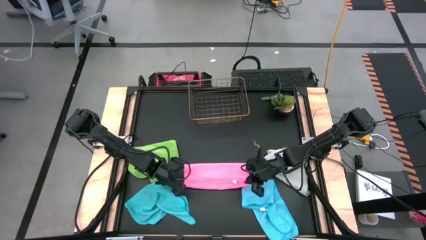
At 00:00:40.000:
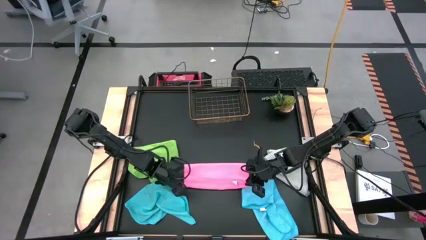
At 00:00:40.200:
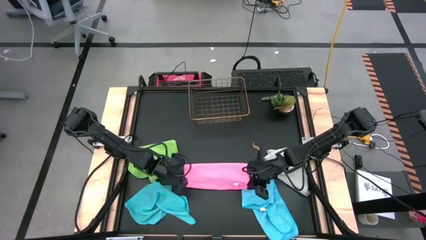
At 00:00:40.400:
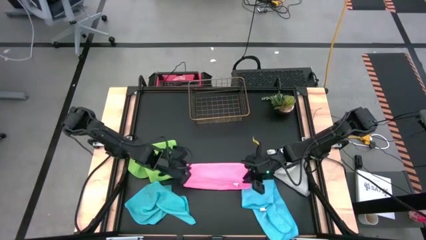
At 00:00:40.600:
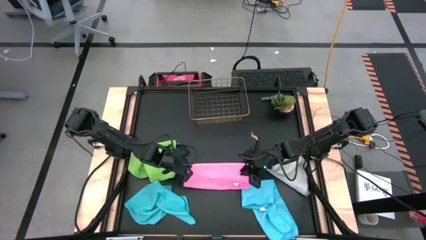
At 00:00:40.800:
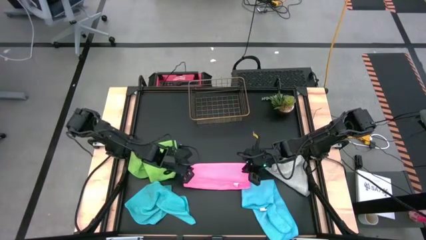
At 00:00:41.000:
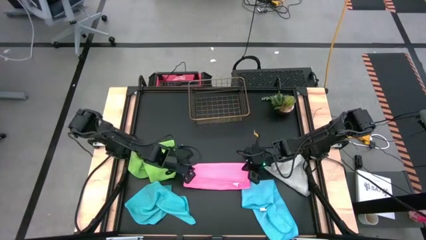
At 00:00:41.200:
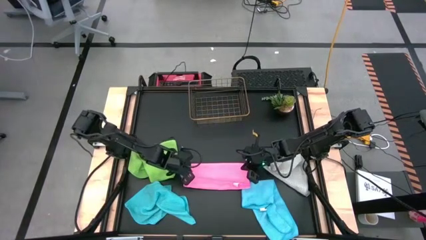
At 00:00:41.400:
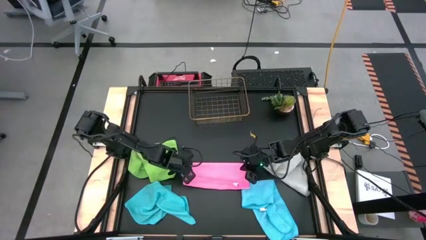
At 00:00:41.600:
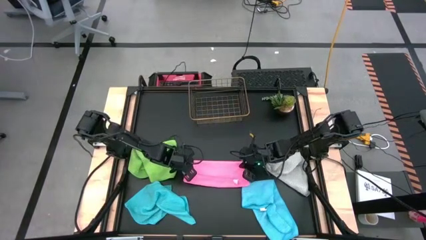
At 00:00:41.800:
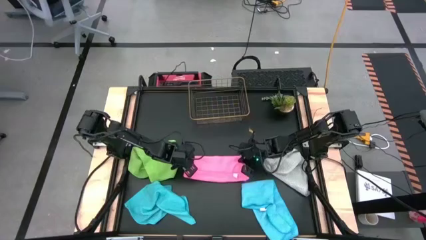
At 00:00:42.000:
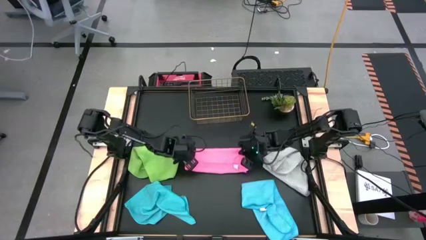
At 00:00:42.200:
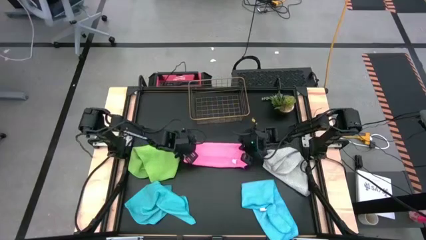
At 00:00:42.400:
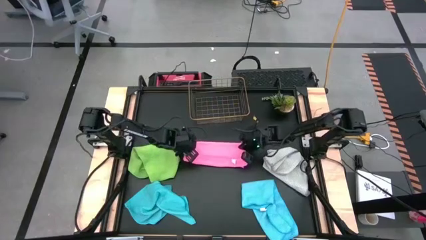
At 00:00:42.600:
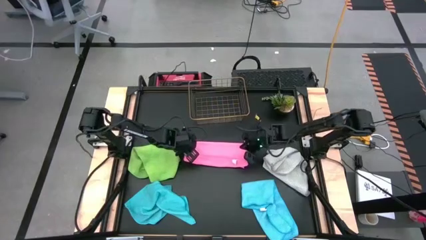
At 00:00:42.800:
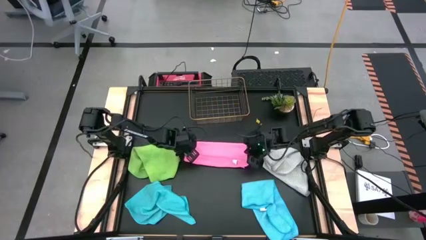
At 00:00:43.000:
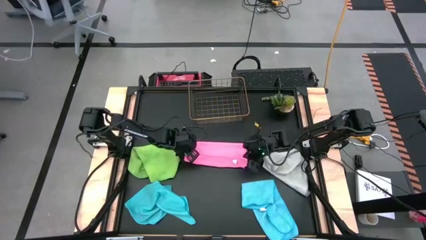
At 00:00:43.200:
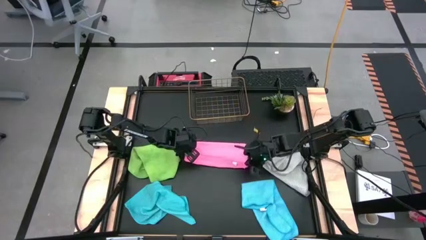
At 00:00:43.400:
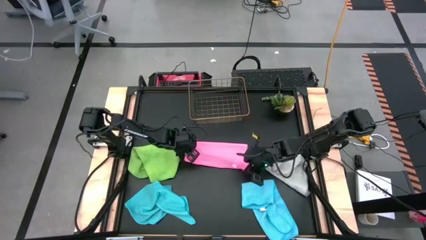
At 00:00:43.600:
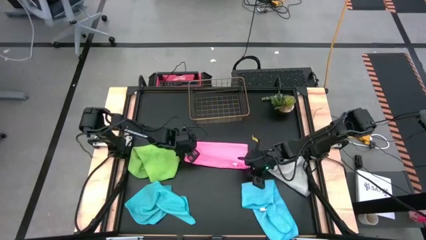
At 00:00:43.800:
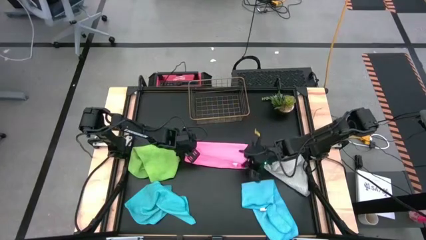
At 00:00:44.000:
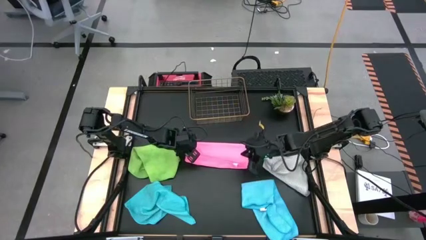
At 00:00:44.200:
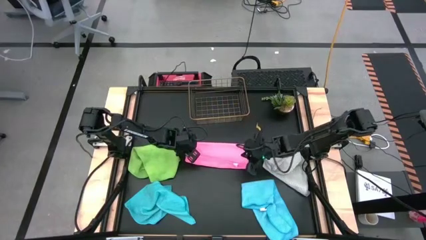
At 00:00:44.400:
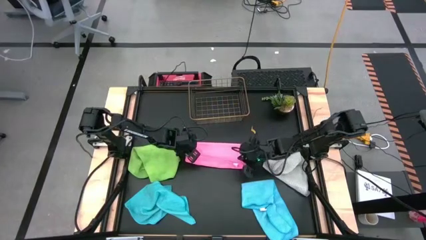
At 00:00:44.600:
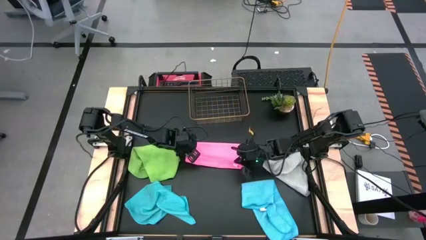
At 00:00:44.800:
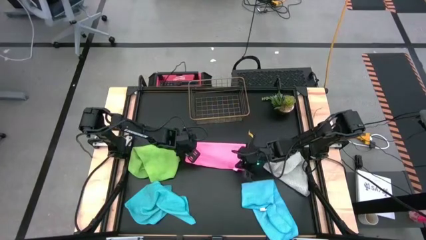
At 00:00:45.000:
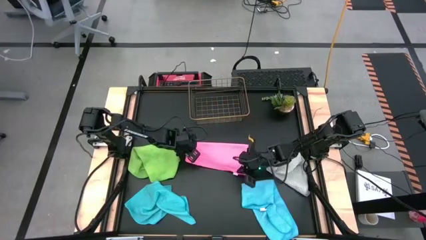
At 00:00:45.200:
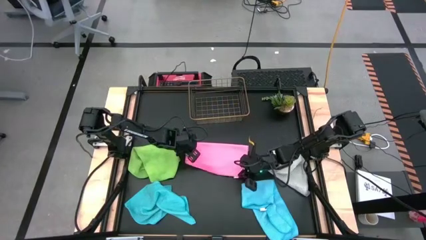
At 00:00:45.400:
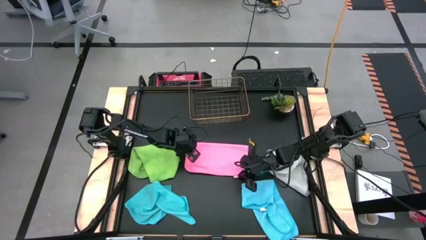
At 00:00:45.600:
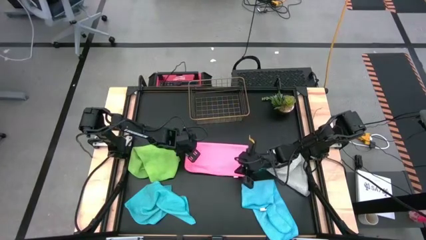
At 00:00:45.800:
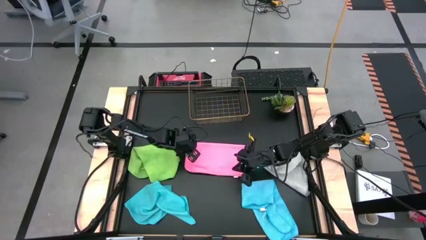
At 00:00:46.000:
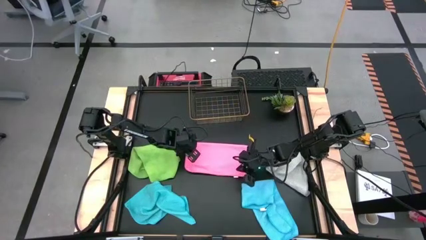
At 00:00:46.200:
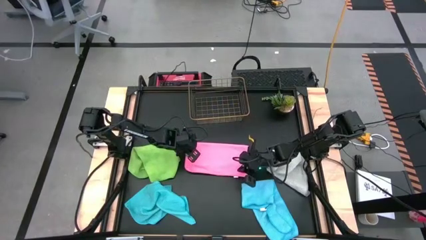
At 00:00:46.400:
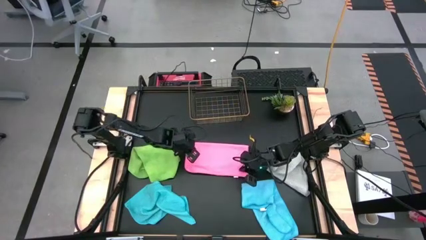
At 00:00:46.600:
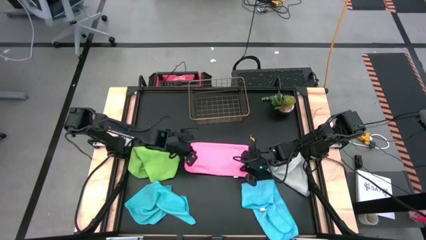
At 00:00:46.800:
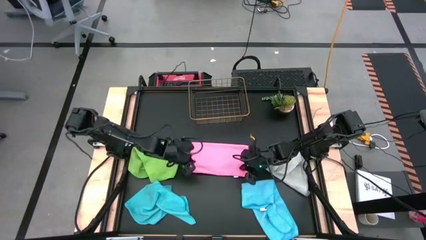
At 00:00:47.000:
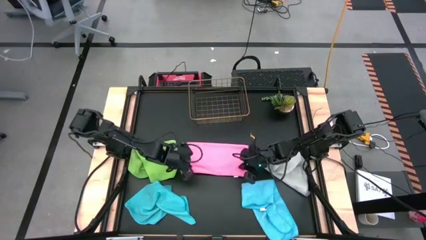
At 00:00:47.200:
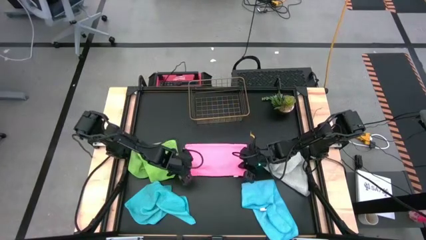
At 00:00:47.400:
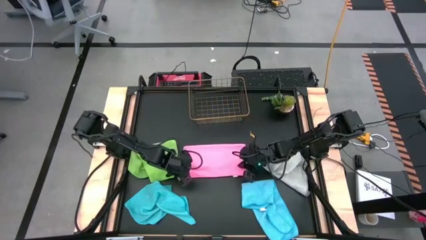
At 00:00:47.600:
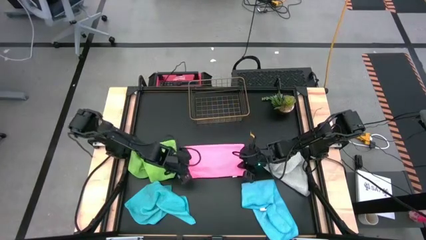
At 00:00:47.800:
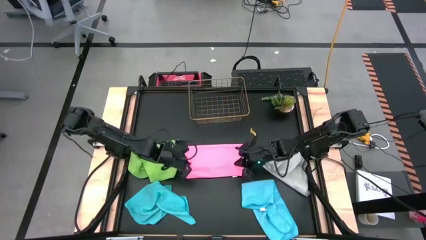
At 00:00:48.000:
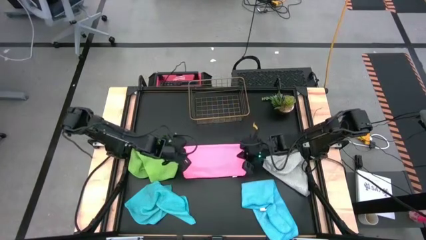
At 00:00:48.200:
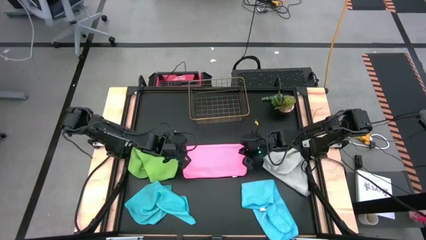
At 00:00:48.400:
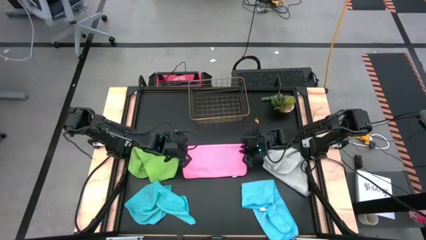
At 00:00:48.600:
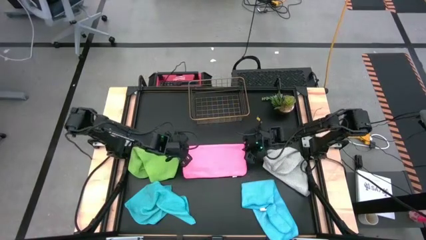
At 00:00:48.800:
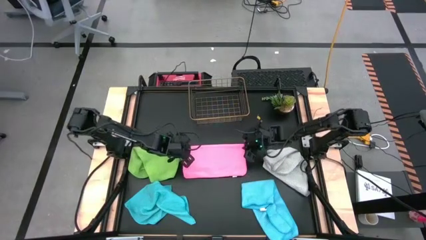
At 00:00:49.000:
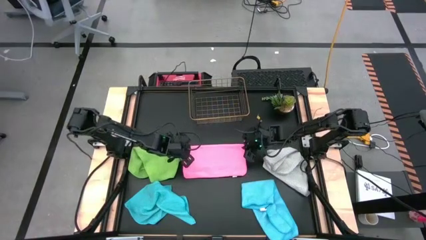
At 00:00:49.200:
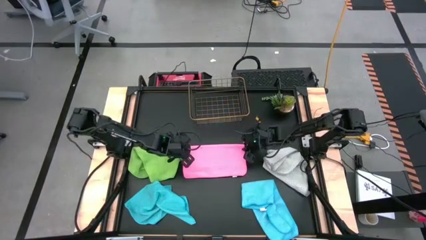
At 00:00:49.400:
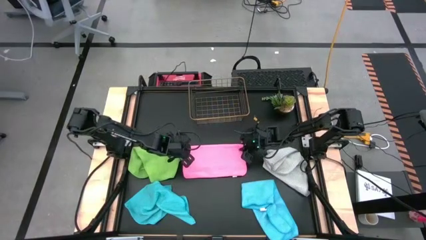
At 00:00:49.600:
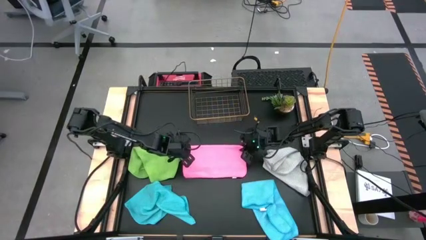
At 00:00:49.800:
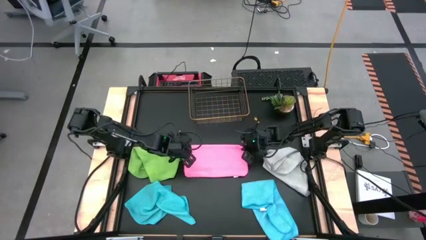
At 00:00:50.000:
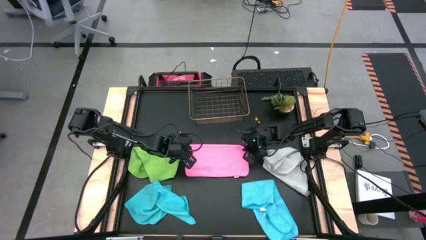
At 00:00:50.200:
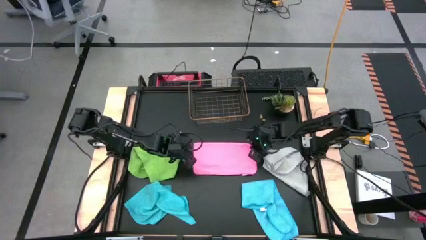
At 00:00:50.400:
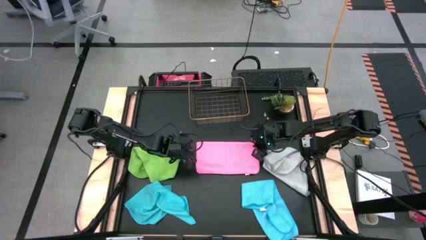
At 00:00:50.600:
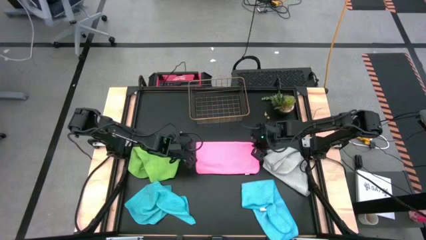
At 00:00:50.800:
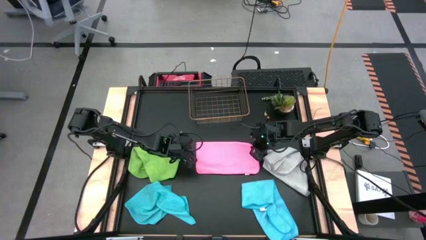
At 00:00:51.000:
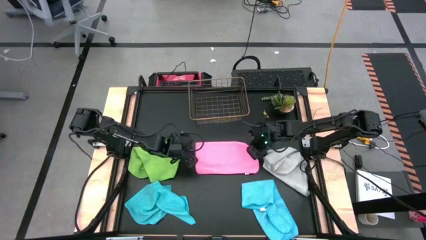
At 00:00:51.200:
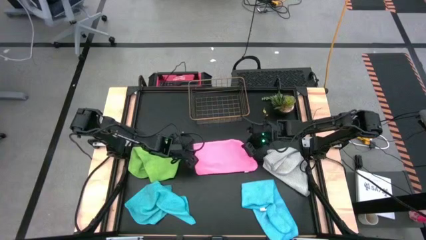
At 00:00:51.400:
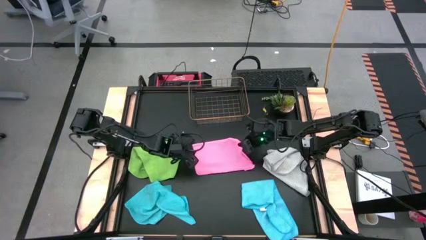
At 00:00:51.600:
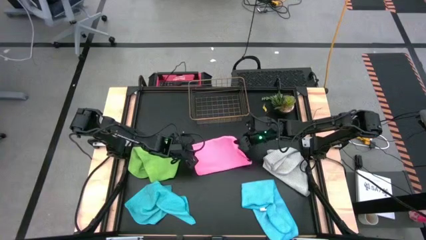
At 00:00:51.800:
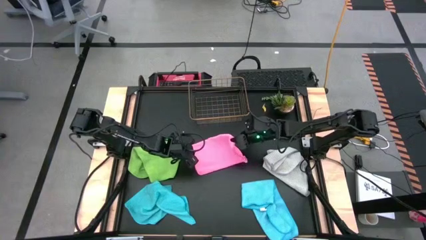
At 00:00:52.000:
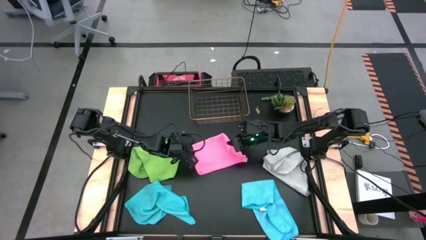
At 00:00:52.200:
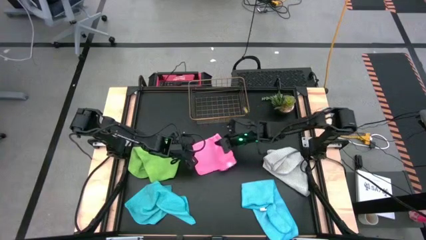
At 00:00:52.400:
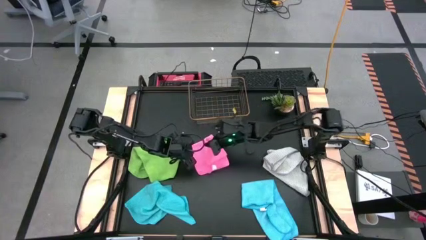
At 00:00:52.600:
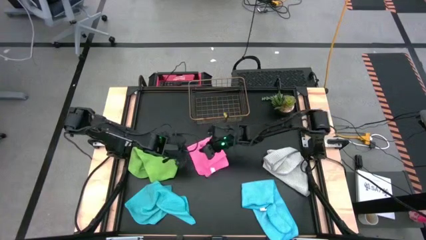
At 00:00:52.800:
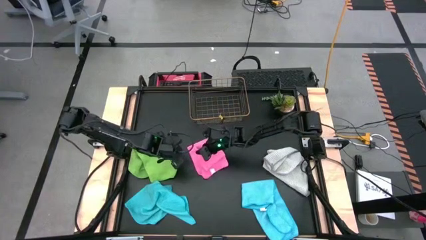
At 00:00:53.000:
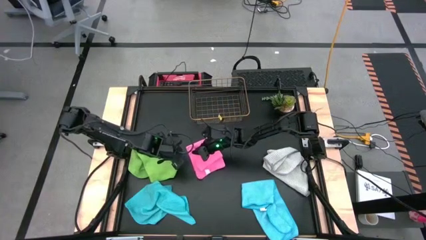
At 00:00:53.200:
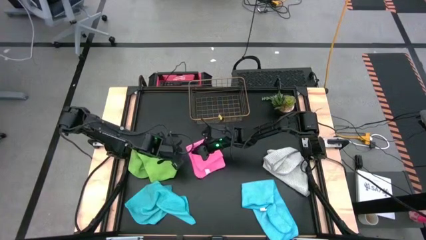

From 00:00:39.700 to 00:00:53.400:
Task: Fold microfiber towels
Fold the pink microfiber cloth
